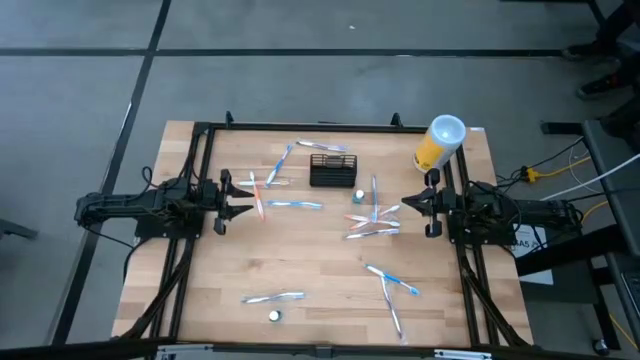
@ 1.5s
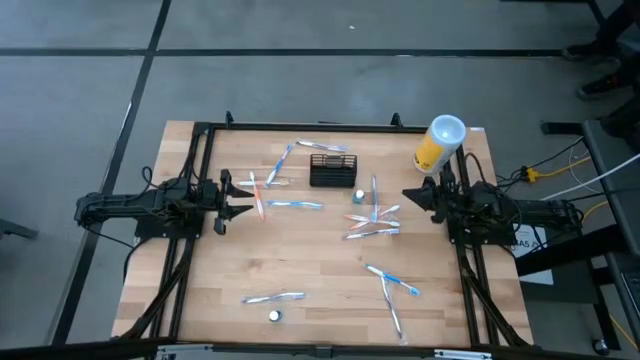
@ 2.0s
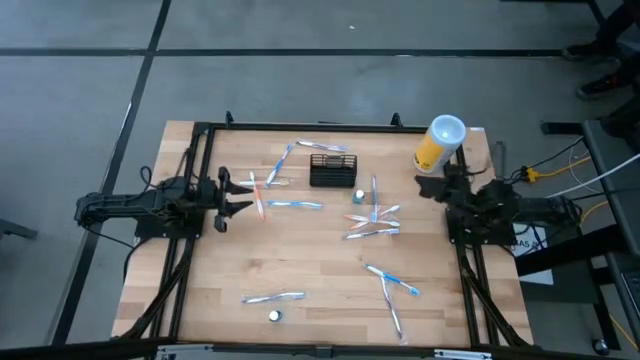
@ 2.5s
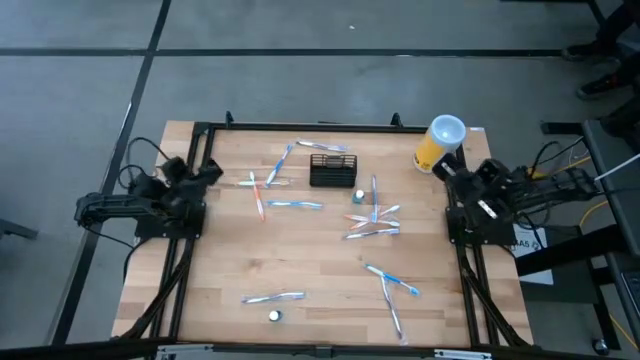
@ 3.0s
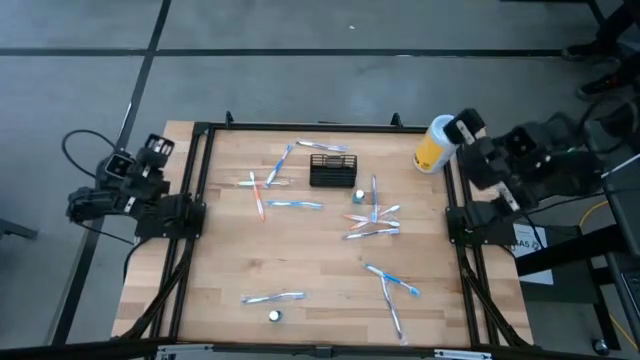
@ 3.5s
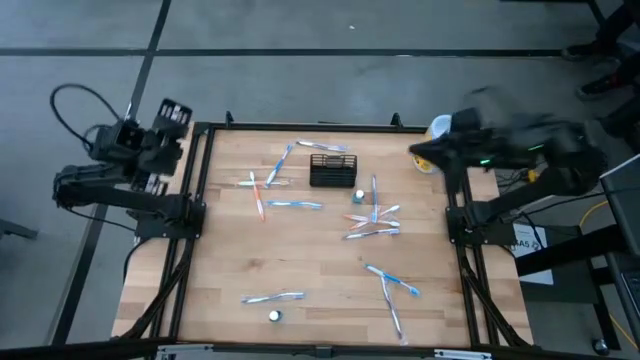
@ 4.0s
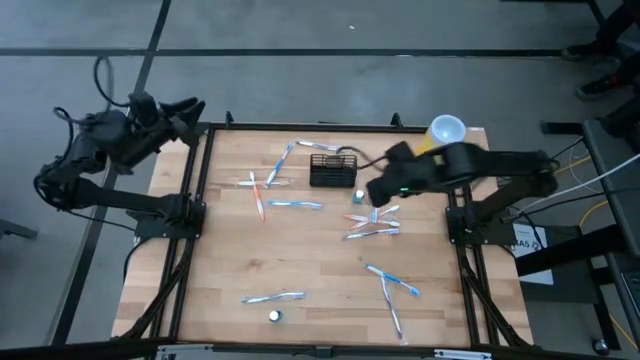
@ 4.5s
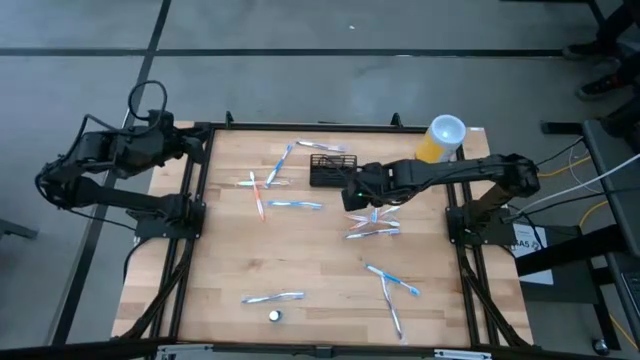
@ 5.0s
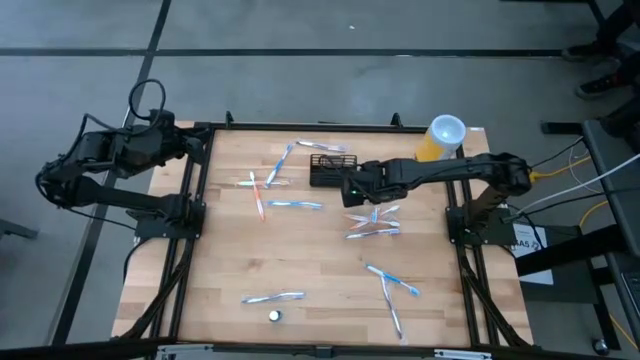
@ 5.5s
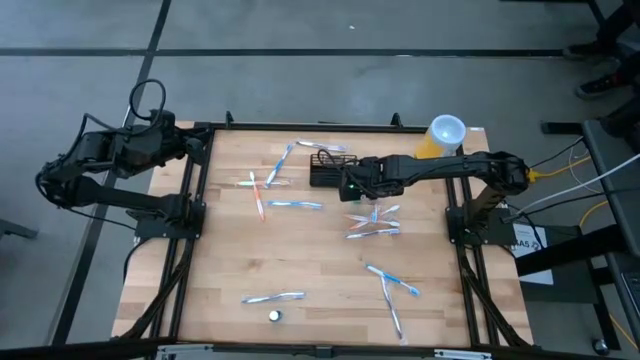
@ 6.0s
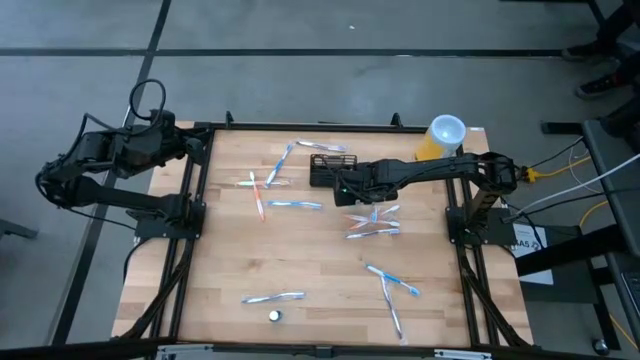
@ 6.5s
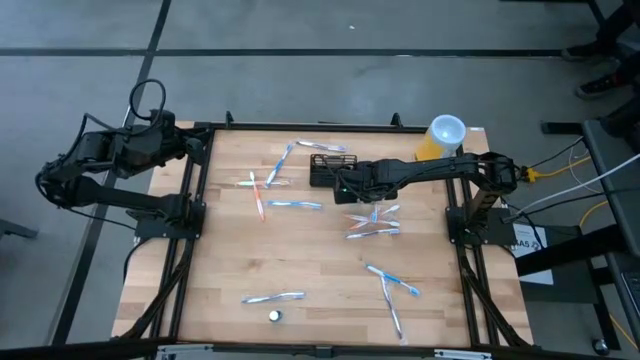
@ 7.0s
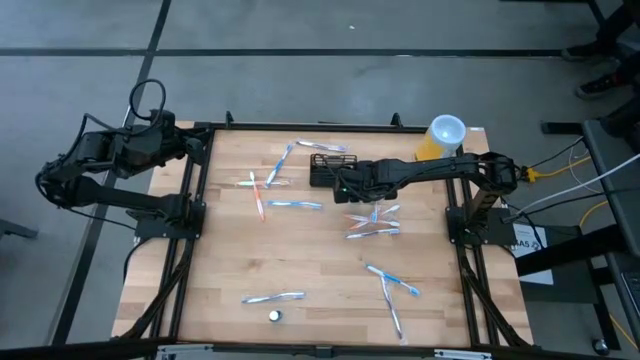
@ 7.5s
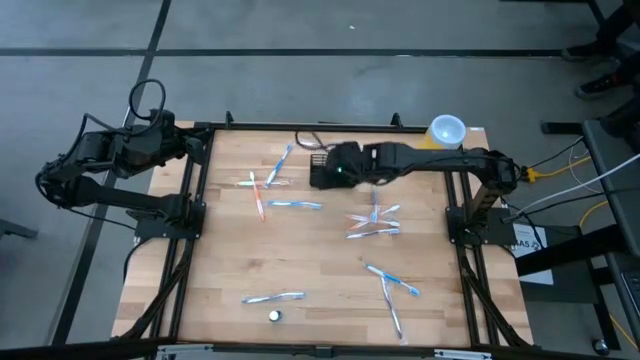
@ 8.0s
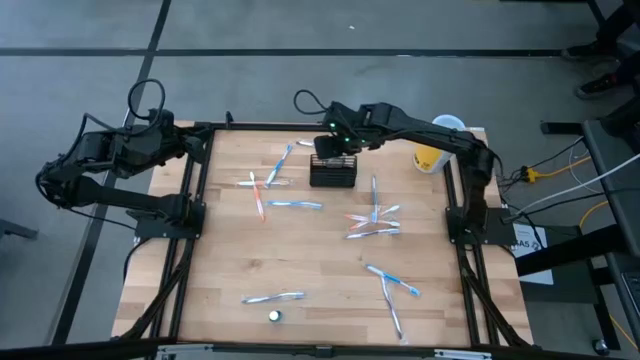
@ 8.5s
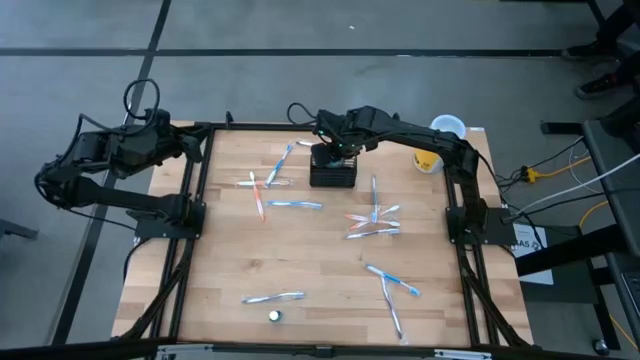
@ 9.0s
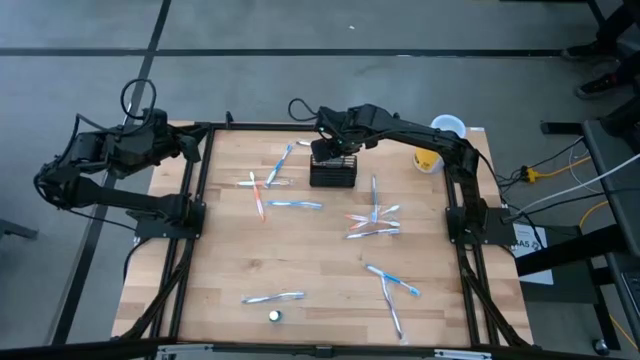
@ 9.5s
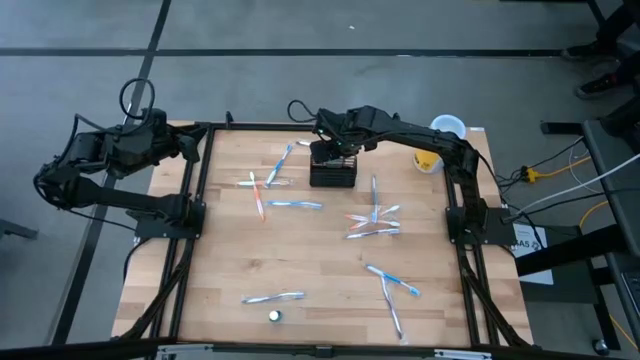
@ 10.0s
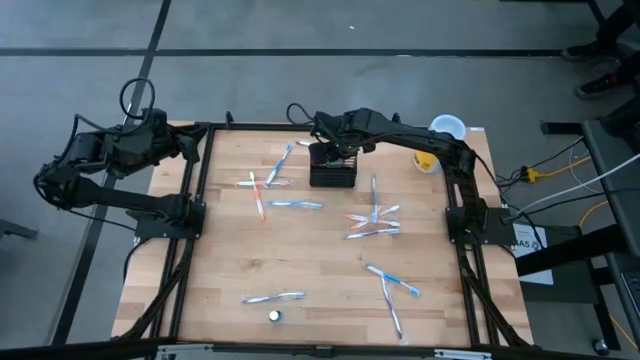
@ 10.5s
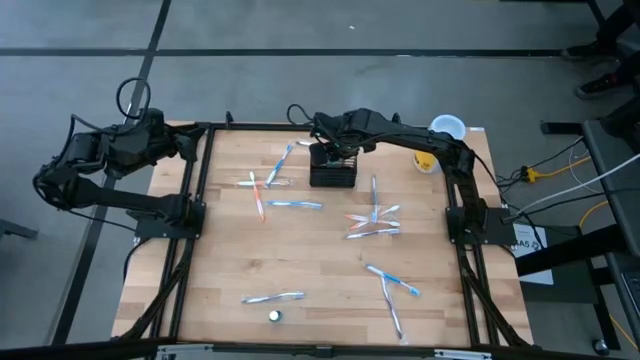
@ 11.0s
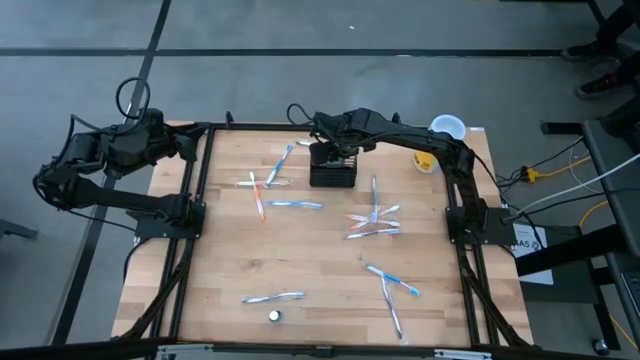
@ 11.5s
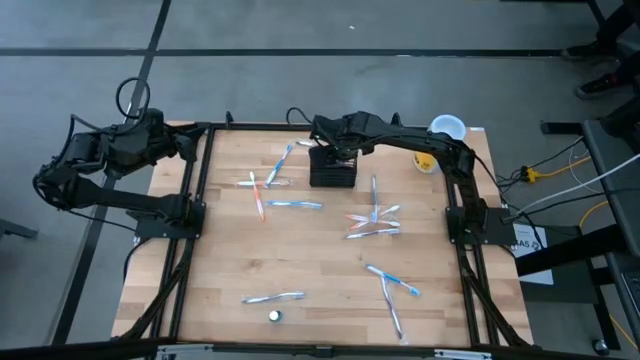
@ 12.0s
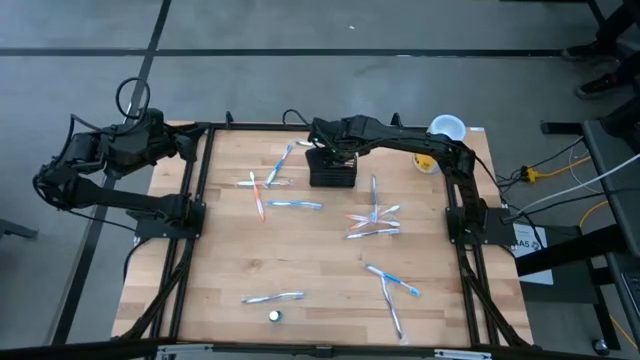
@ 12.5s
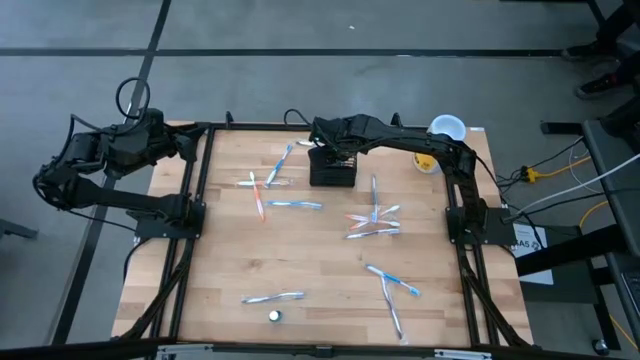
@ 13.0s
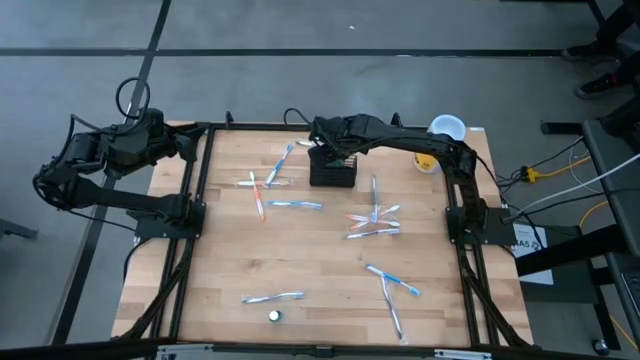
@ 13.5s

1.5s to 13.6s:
Task: Pick & Place toothbrushing station
Put the blue mouthwash into the black mesh organizer

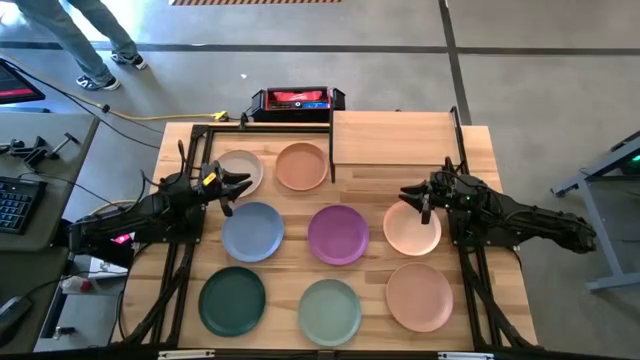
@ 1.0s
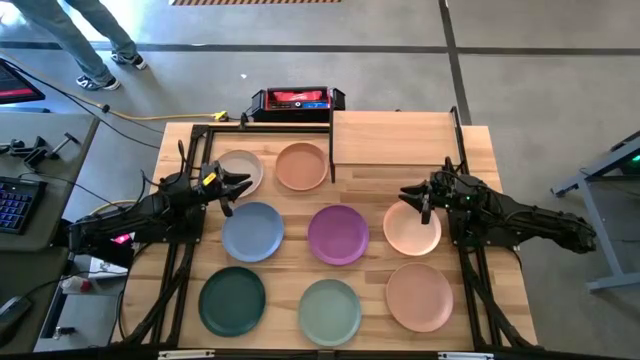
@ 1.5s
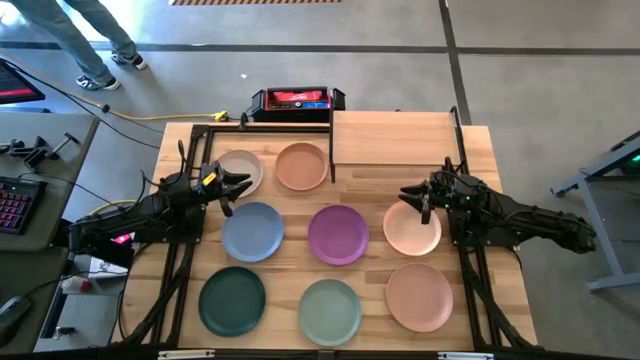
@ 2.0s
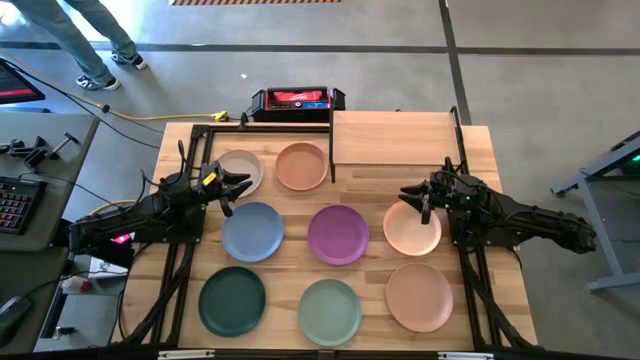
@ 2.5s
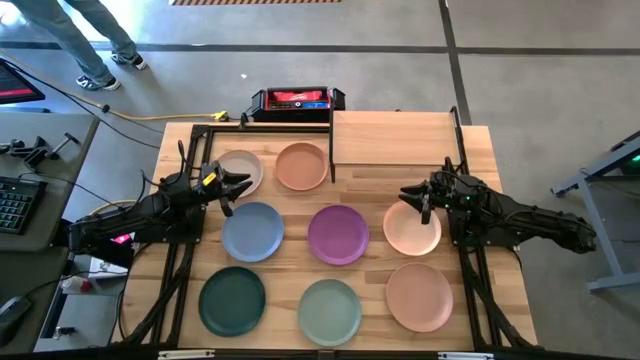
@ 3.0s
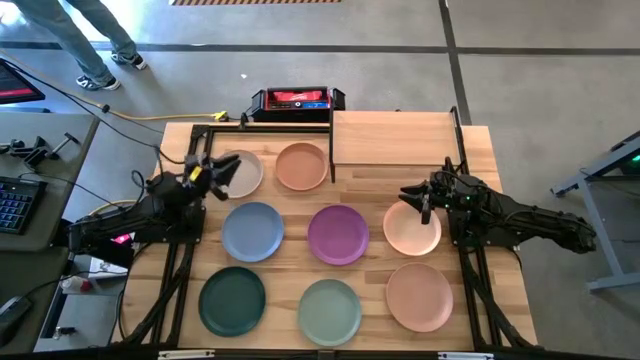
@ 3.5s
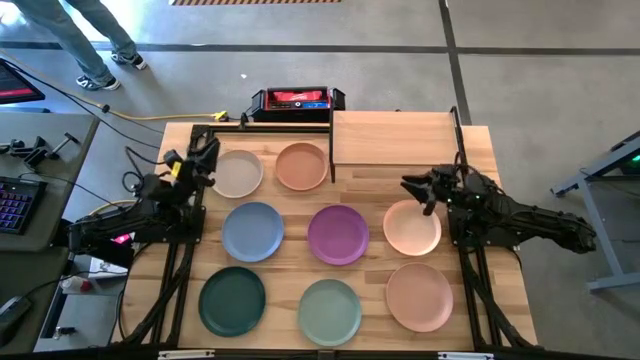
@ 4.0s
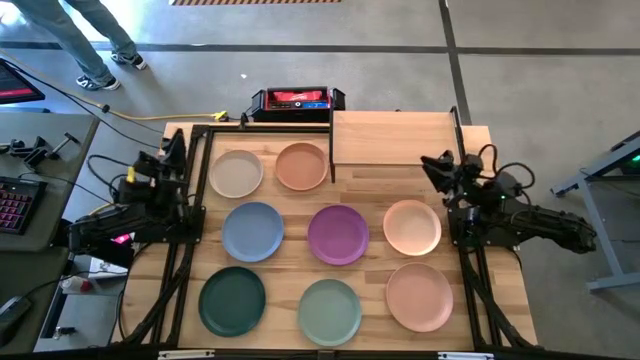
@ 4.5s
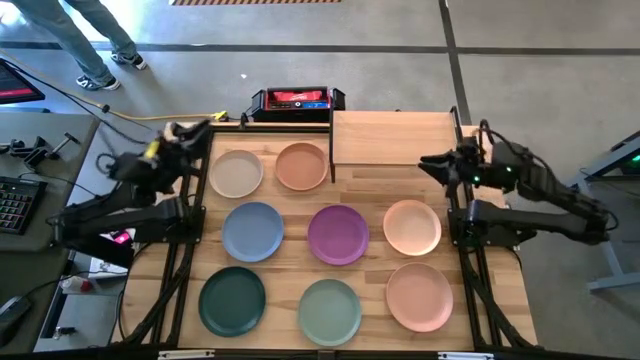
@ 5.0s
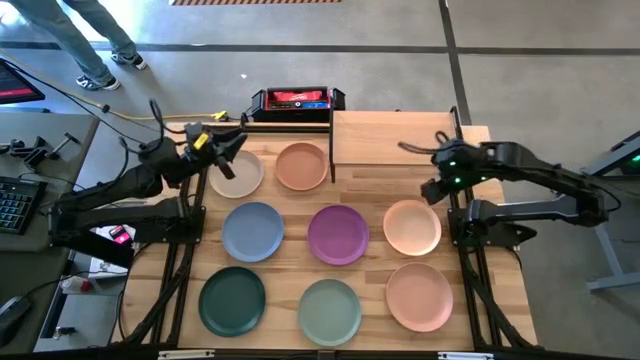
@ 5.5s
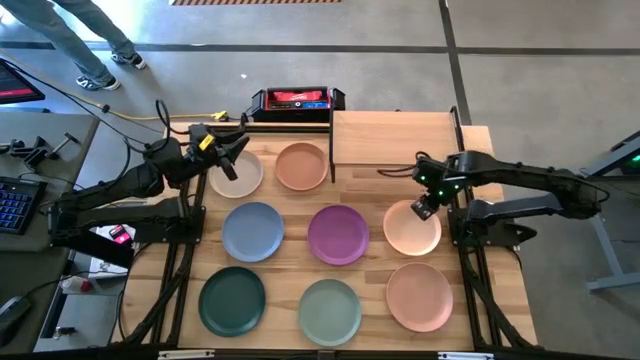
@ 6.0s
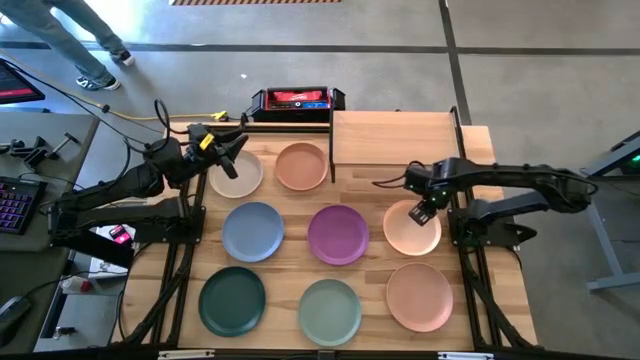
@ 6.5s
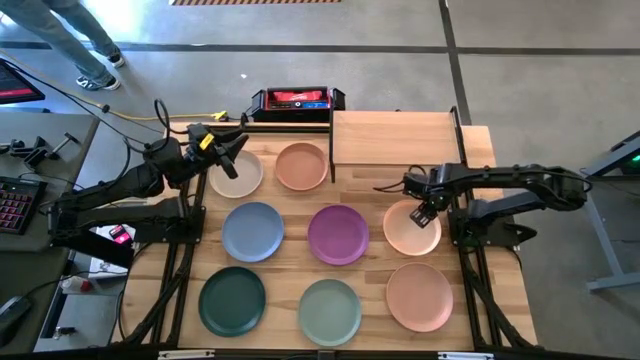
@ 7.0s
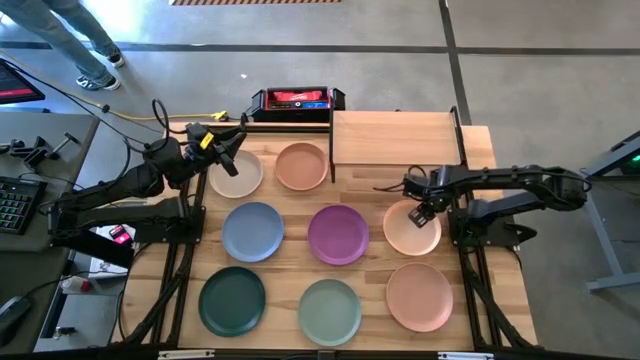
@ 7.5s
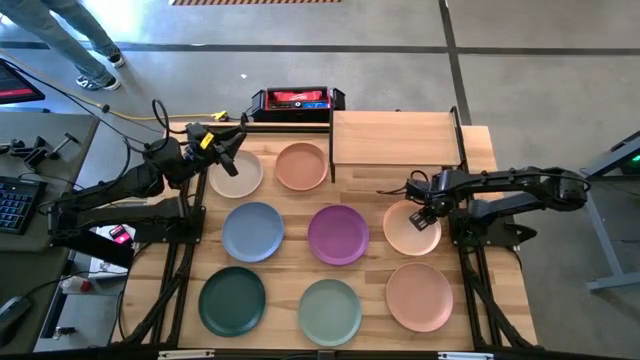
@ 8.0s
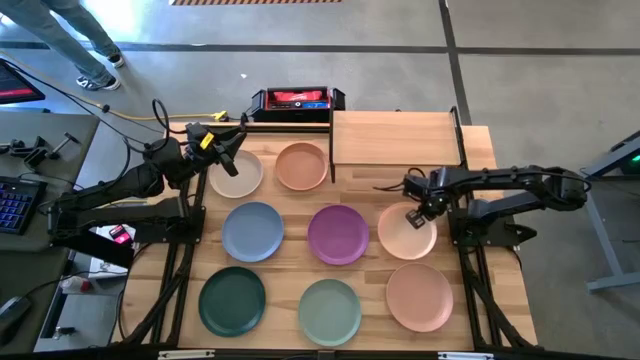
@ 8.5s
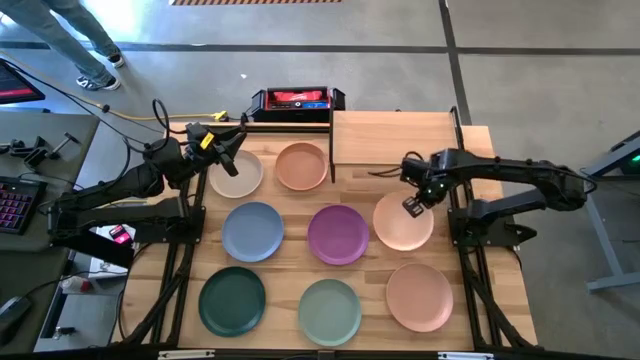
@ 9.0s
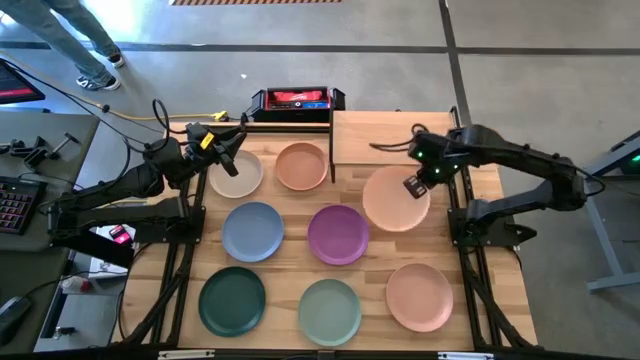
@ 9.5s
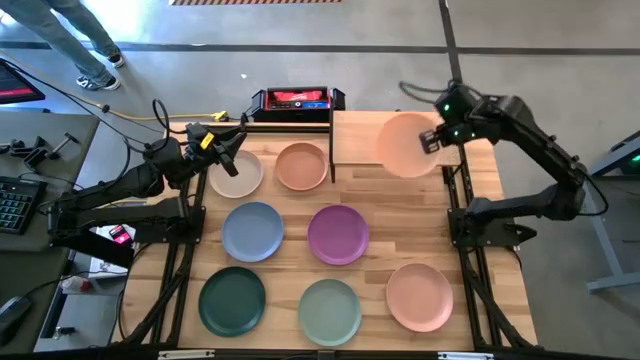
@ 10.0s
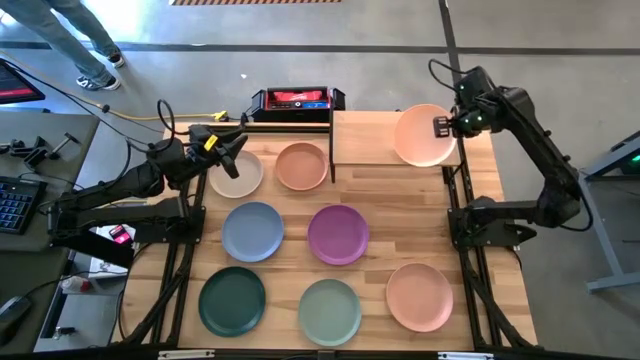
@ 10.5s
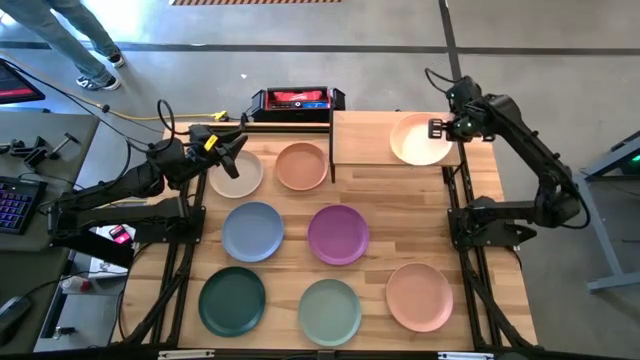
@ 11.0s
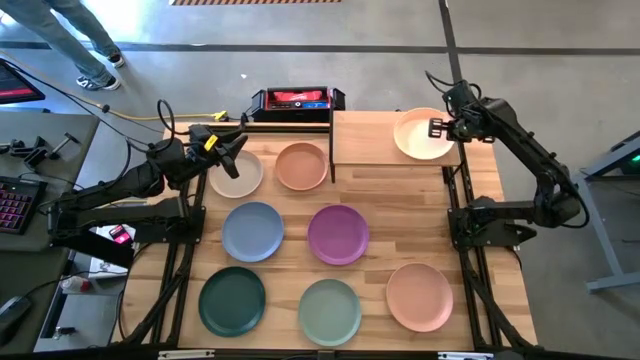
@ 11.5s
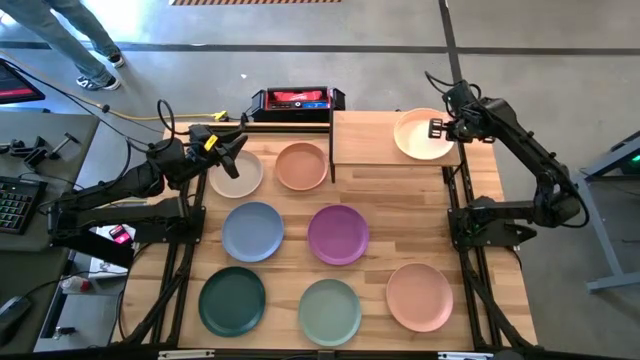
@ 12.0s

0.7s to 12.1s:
Task: Place and stack plates onto a shelf
Put the light orange plate on the shelf
